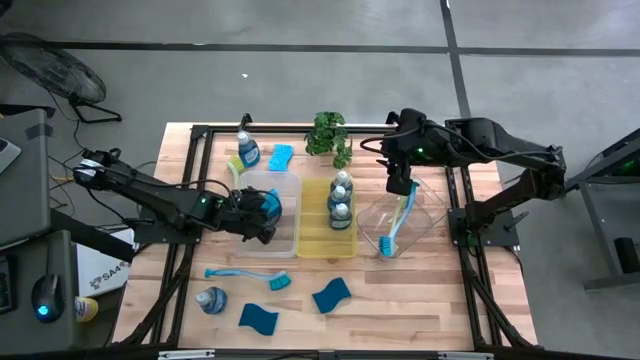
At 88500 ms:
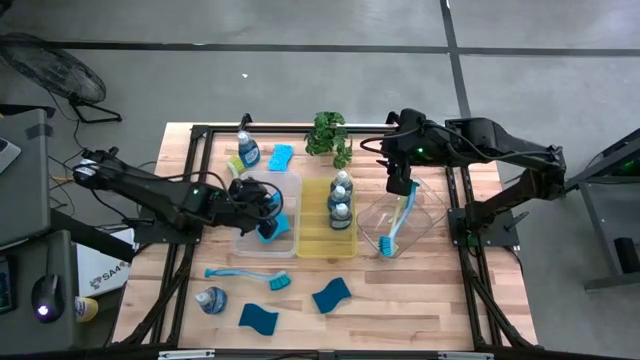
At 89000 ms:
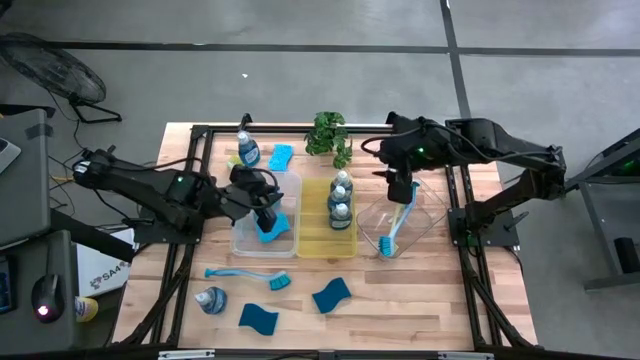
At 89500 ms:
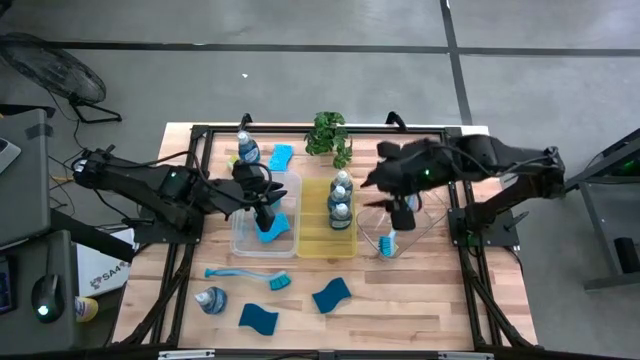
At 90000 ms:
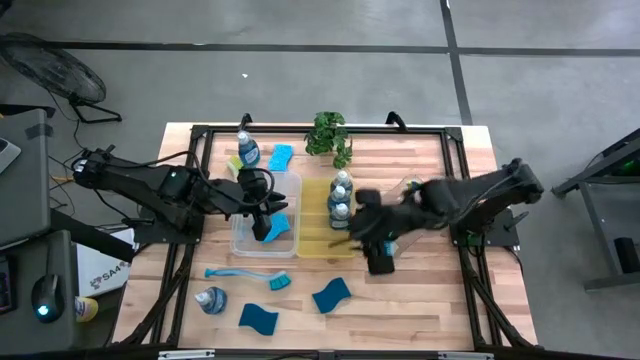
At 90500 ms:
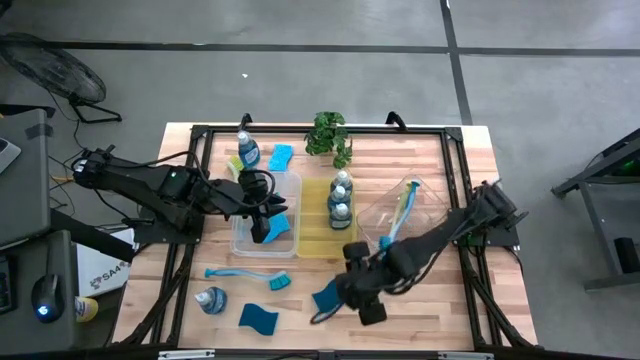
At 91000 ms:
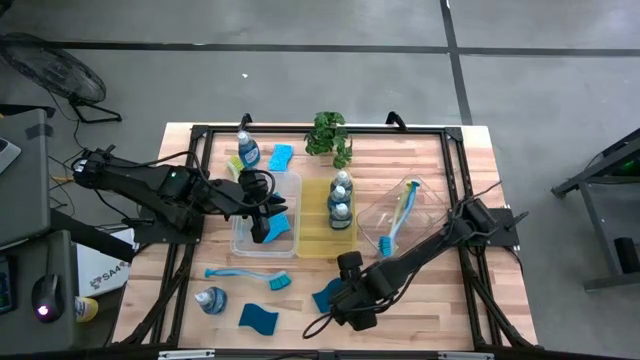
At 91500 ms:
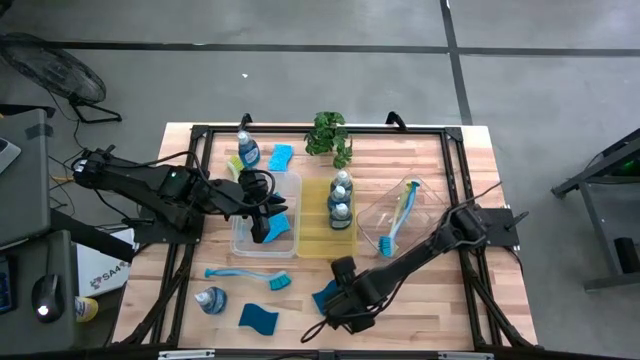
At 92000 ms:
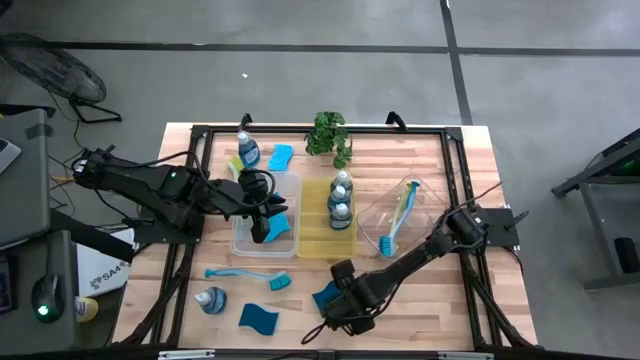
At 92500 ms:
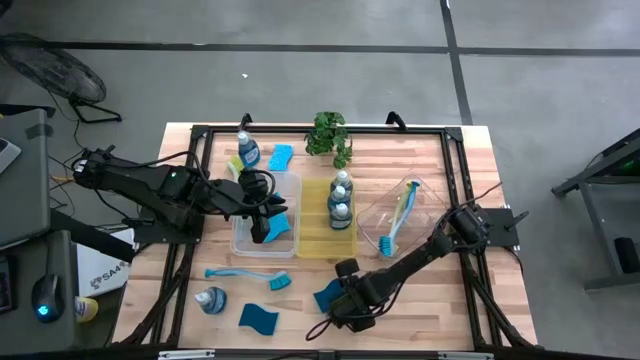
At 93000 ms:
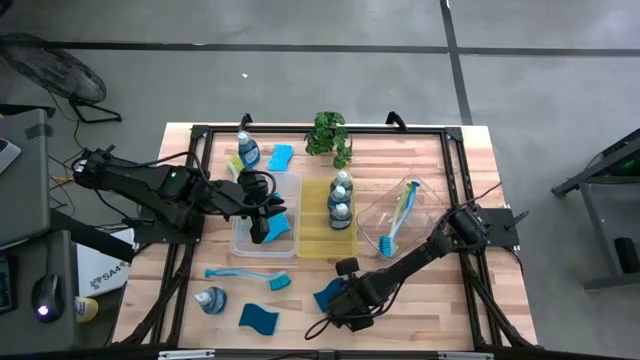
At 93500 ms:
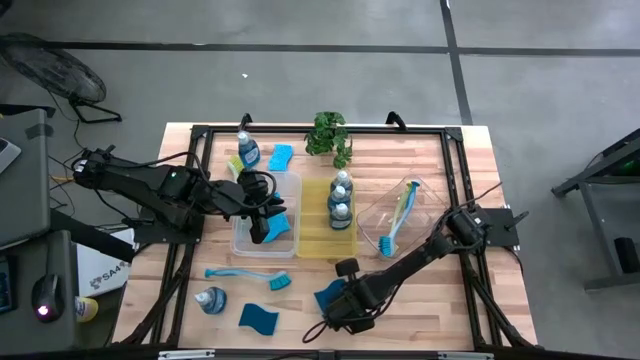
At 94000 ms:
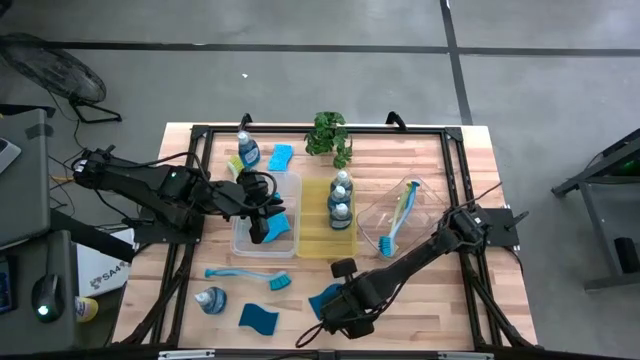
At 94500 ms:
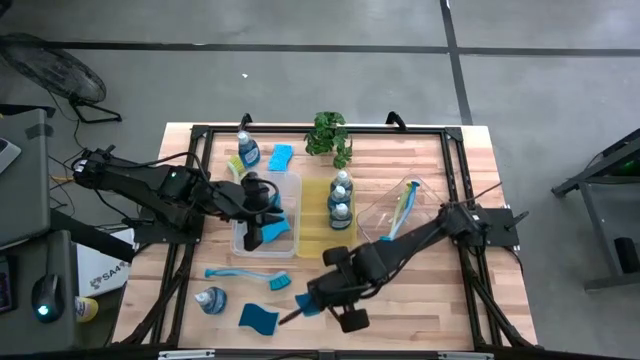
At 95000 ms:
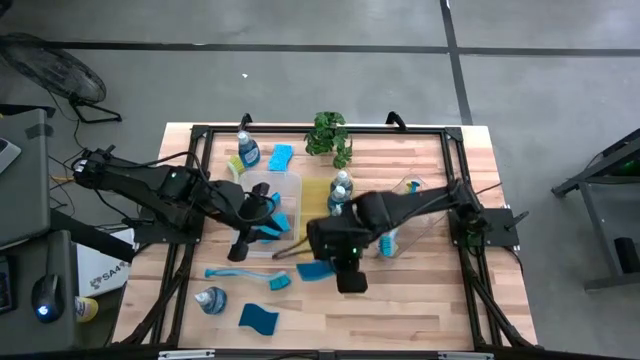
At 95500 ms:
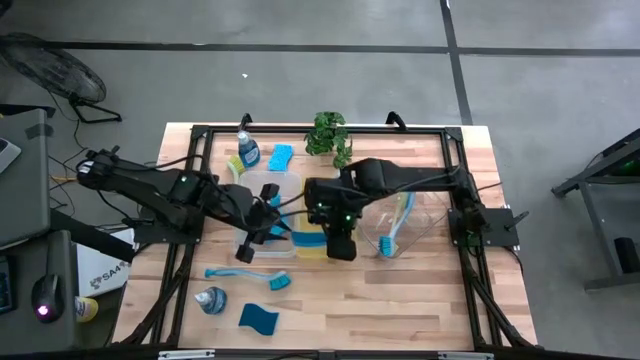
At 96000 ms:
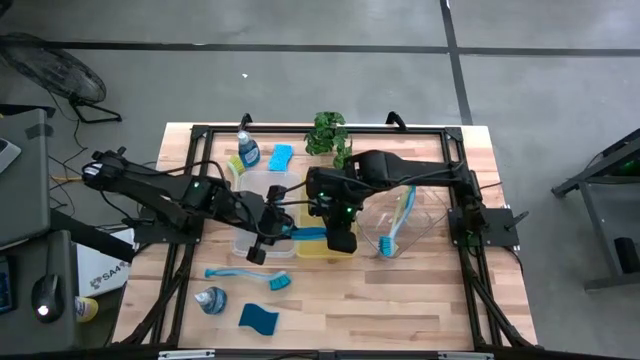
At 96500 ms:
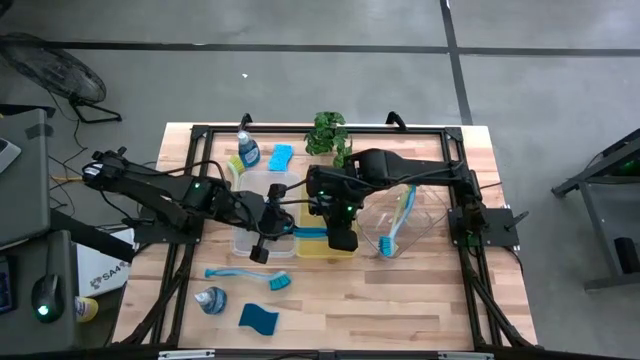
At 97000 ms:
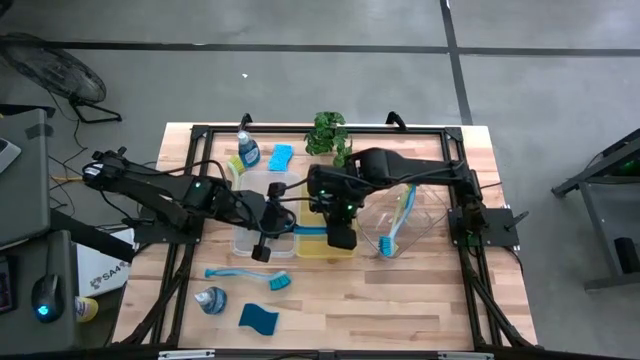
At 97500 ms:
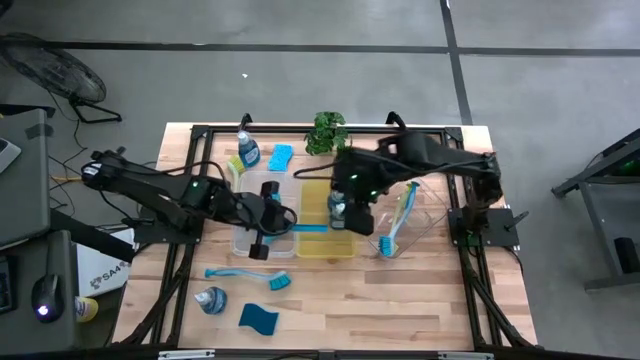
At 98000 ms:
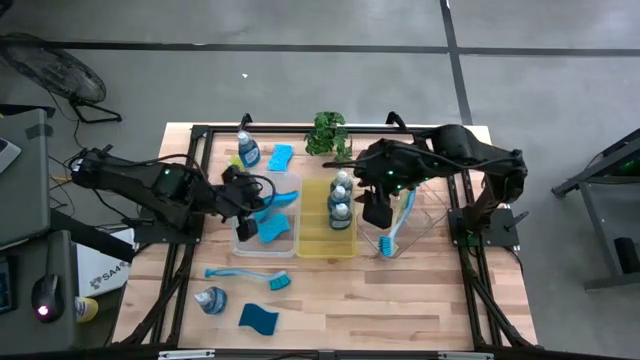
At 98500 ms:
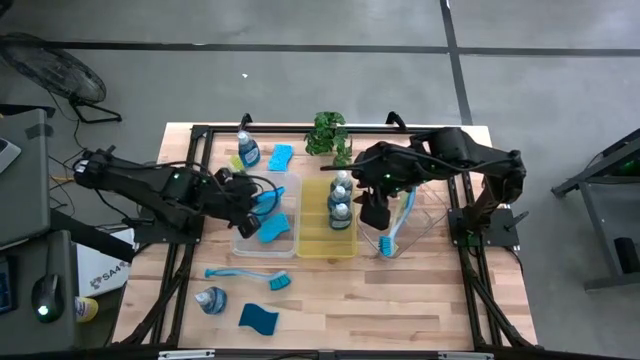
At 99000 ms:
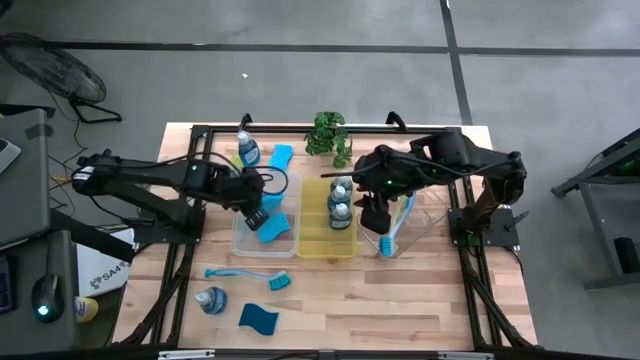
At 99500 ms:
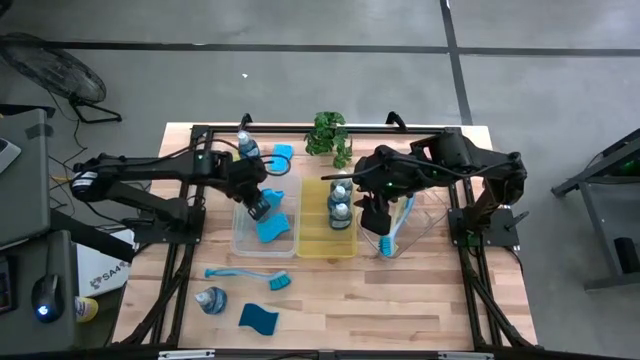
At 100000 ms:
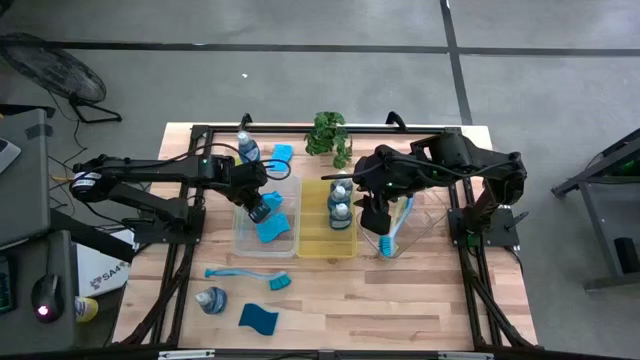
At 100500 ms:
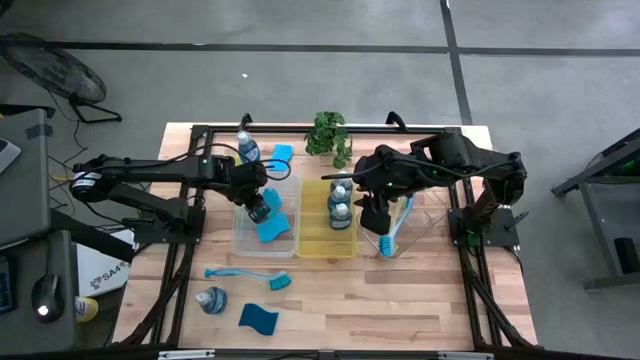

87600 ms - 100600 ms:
Task: Pick & Place Kitchen Sink Supplies
Put the blue sponge into the white bin

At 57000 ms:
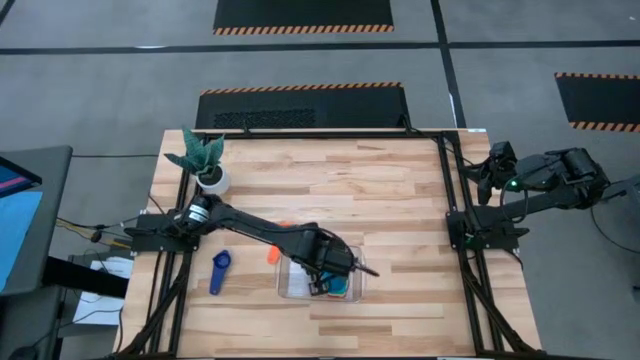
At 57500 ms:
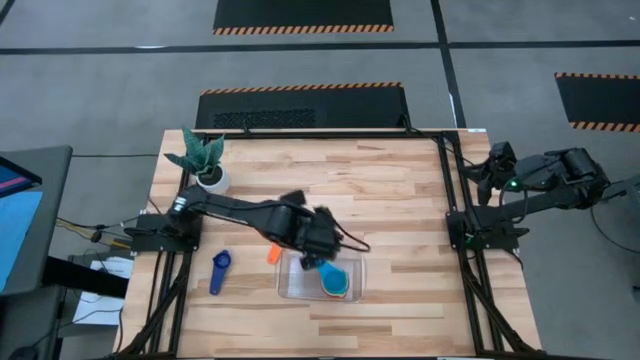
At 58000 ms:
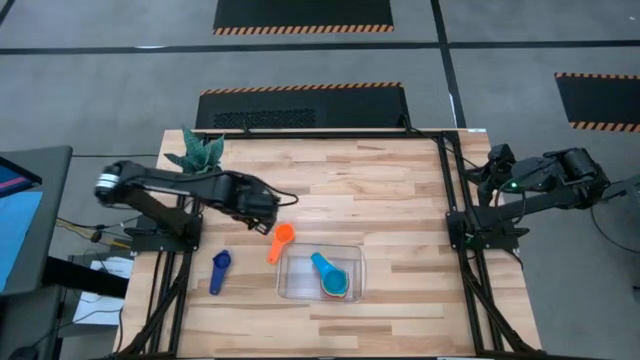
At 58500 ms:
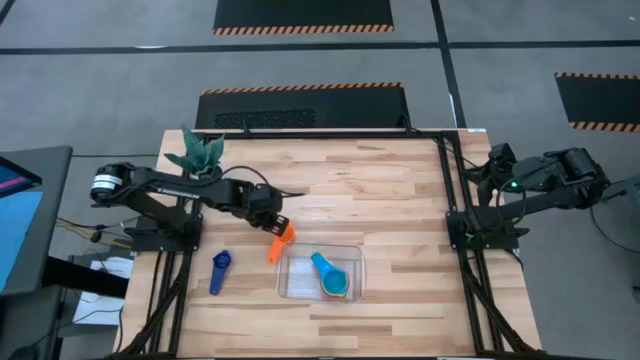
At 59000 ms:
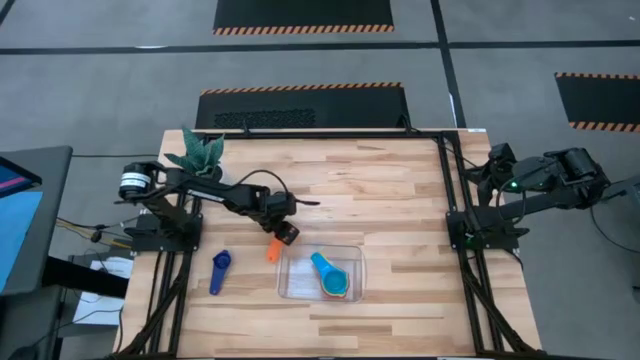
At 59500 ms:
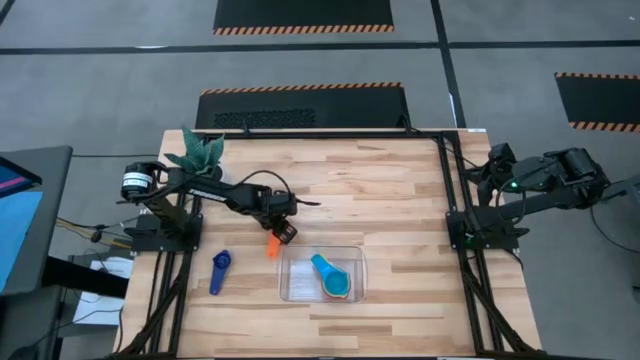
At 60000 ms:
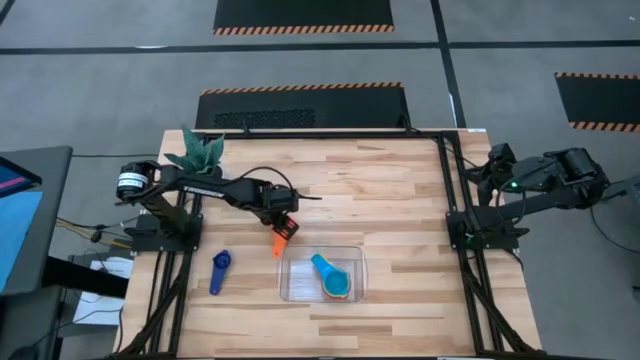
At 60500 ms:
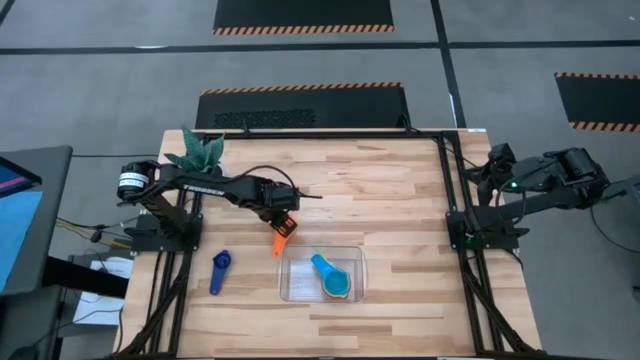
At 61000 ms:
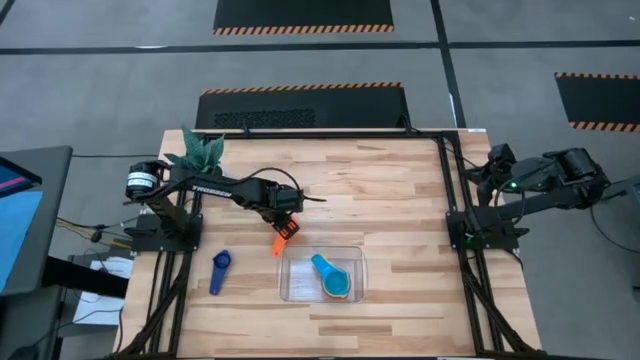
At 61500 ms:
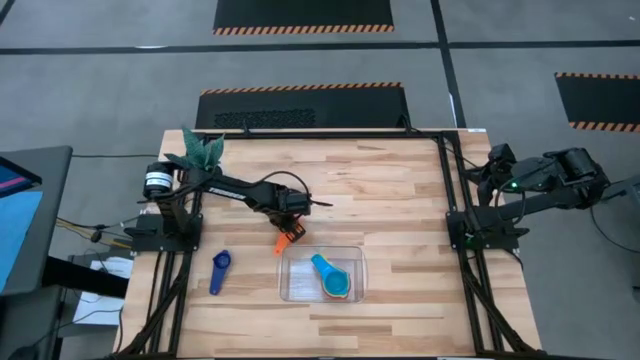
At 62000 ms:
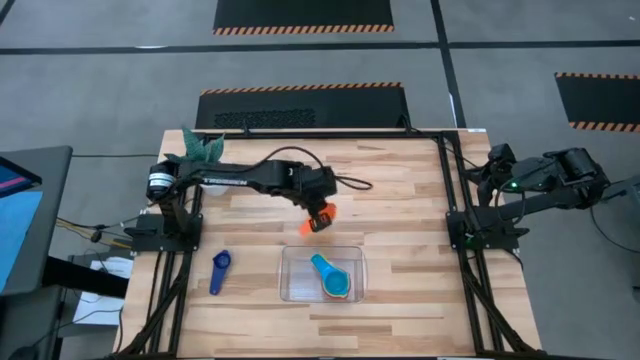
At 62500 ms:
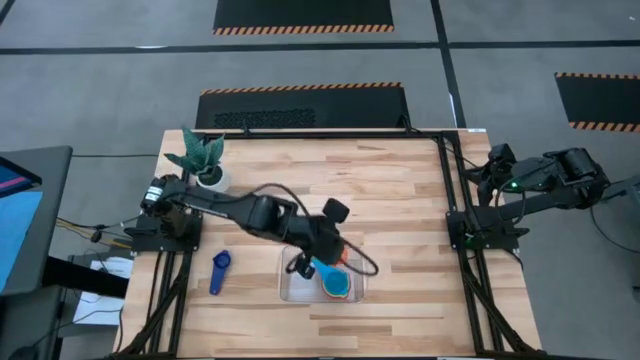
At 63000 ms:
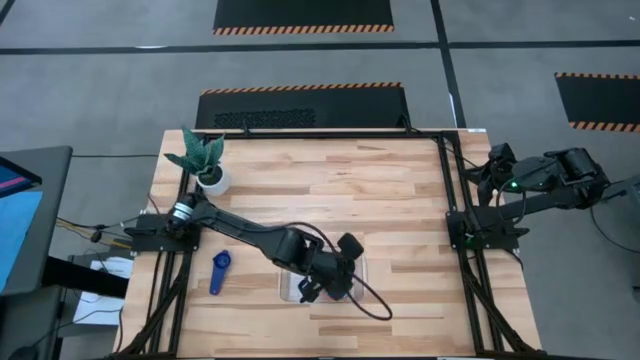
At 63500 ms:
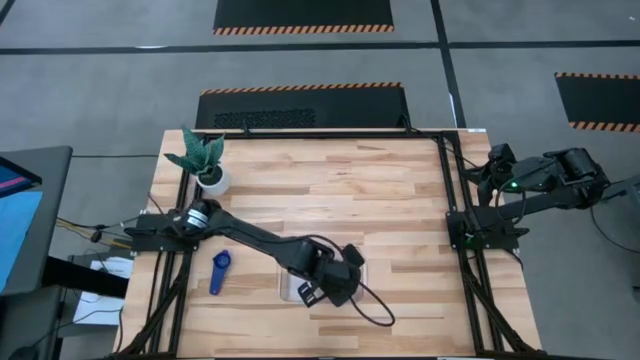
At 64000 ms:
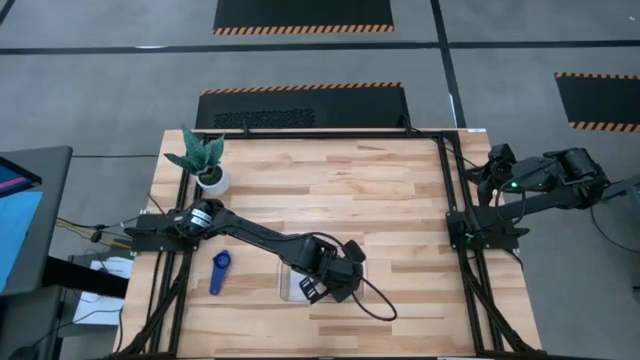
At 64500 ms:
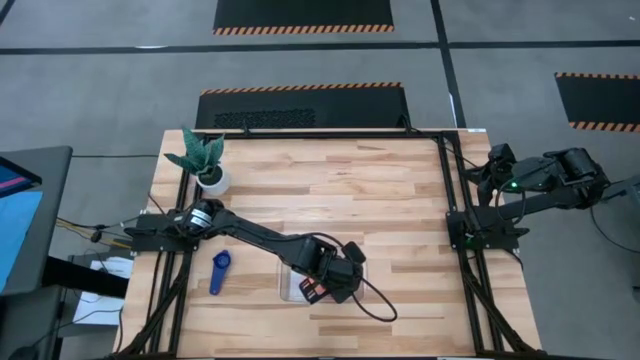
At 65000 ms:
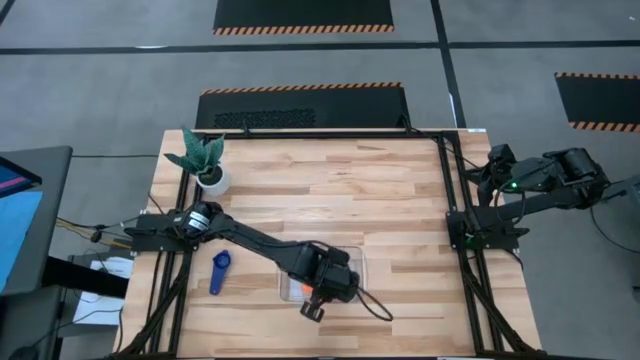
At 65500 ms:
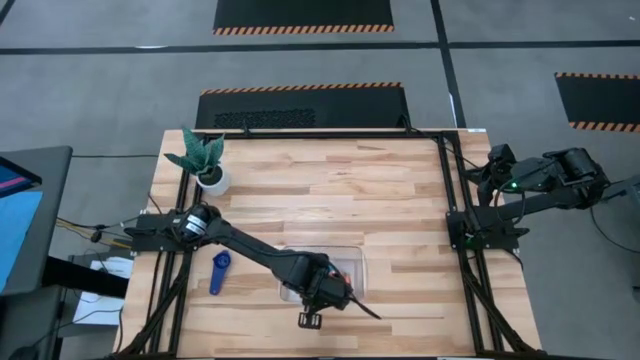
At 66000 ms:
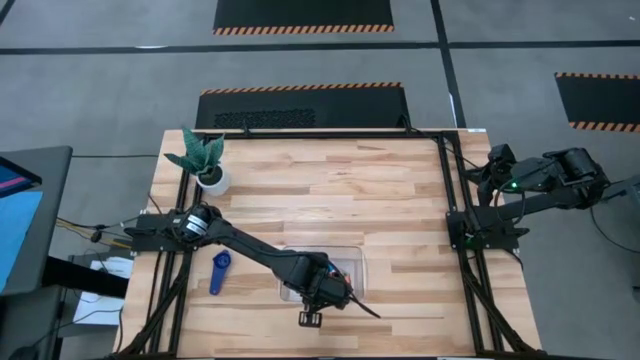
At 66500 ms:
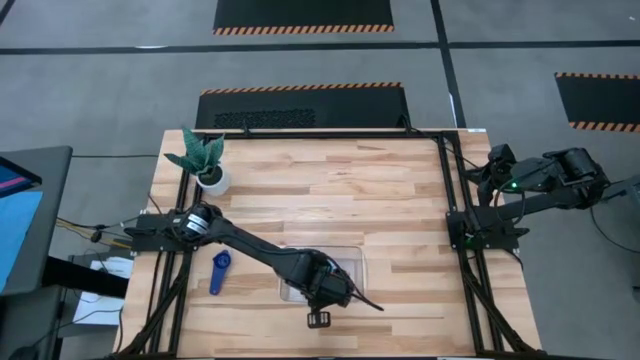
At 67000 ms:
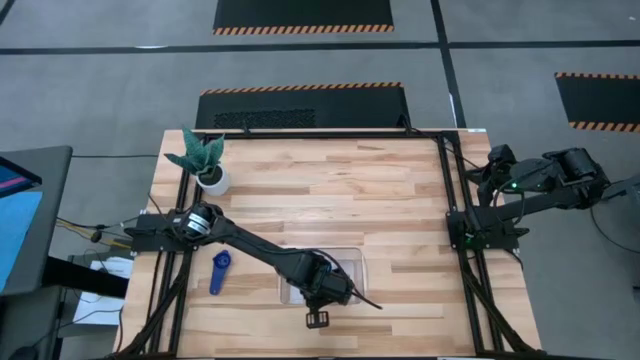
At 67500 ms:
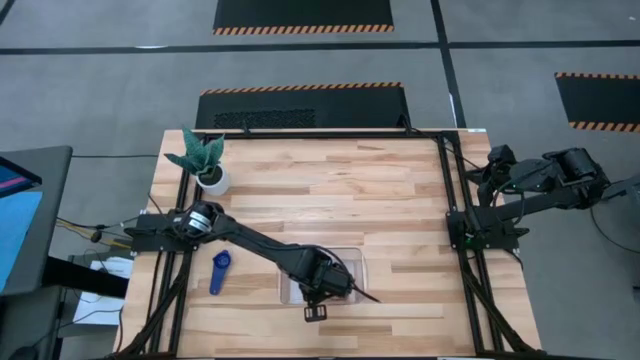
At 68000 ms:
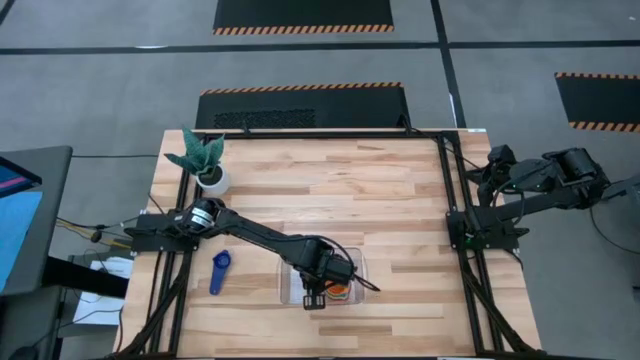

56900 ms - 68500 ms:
Task: Nest measuring cups in basket
Stack the orange measuring cup on top of the light blue measuring cup in the transparent bin
